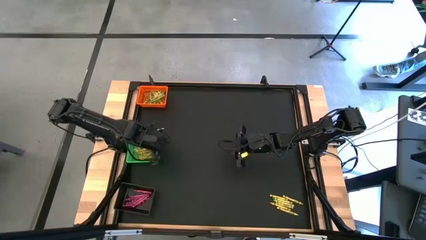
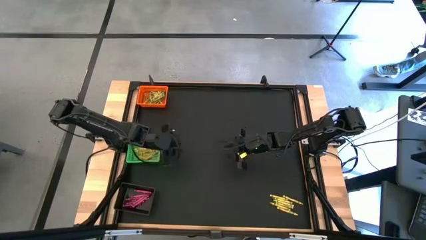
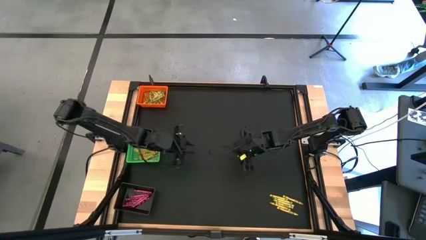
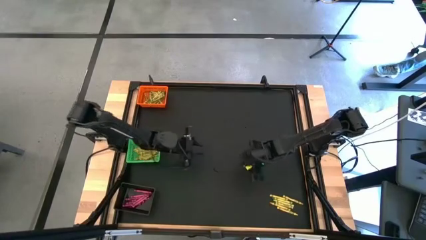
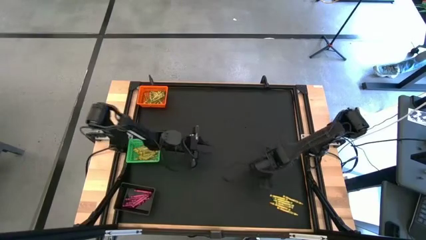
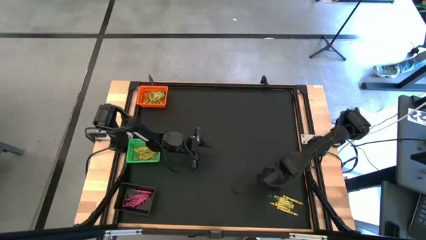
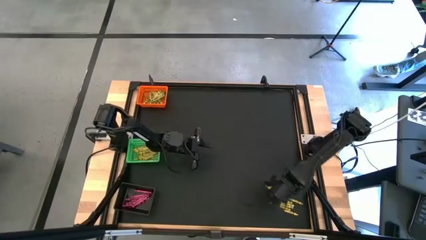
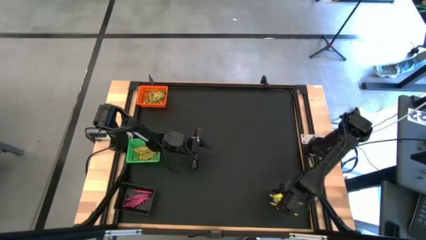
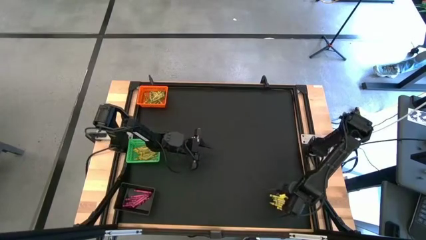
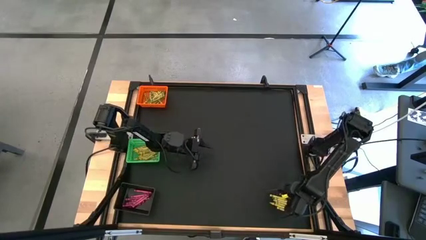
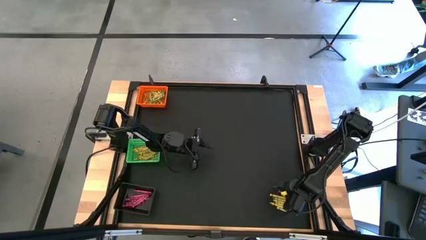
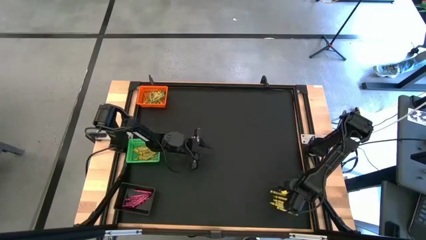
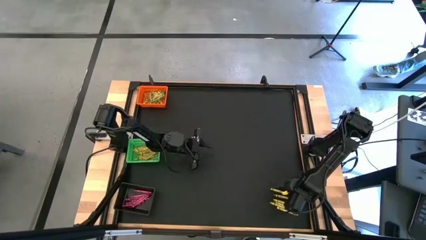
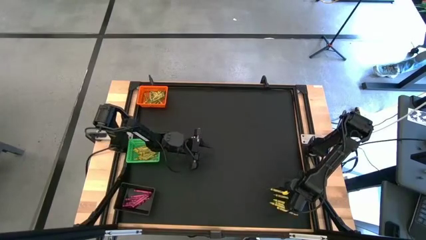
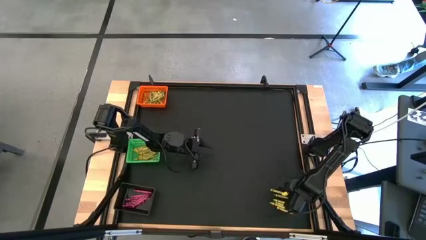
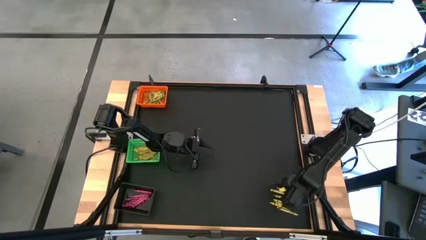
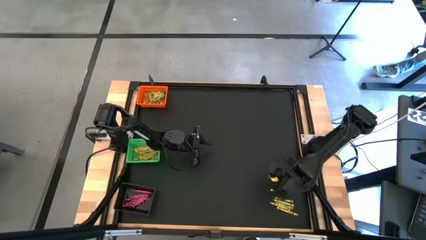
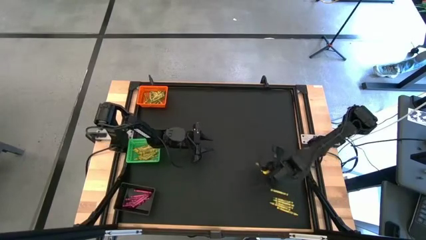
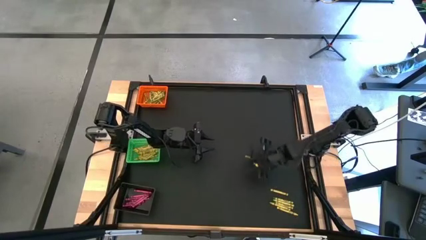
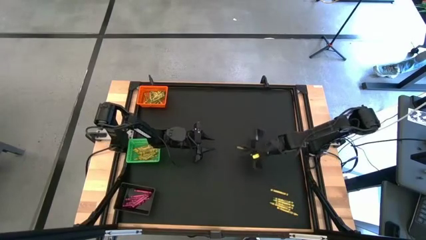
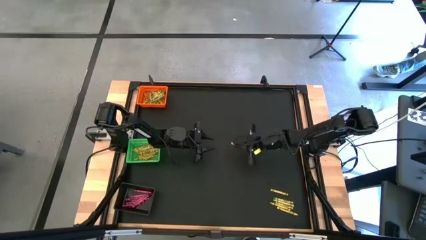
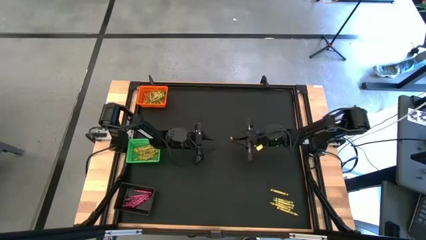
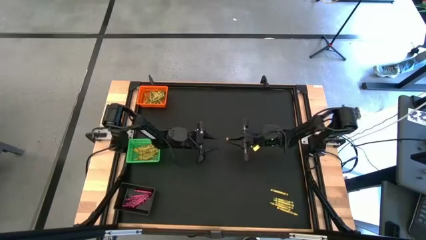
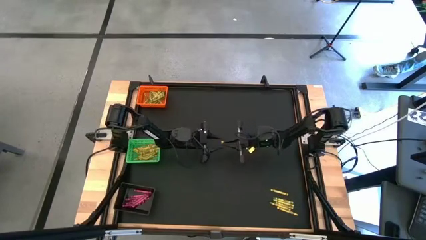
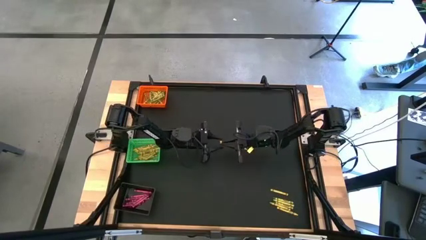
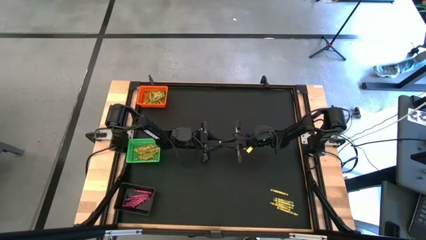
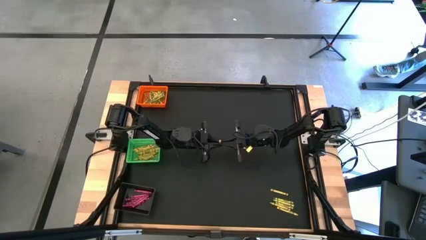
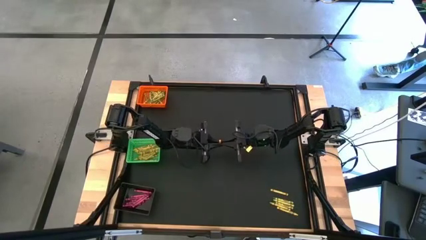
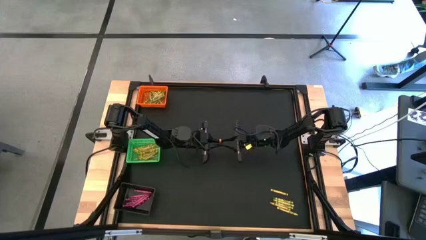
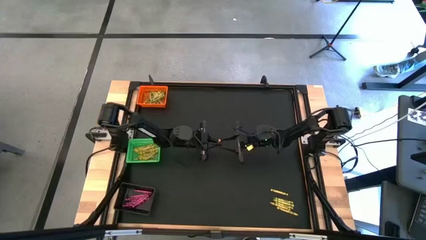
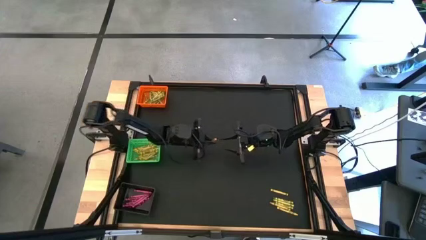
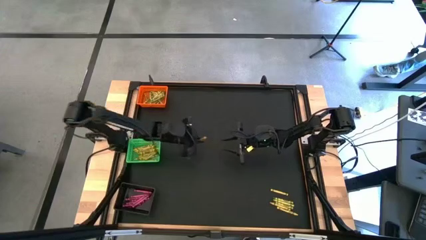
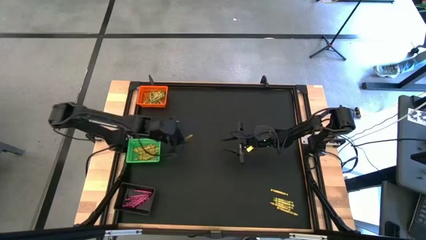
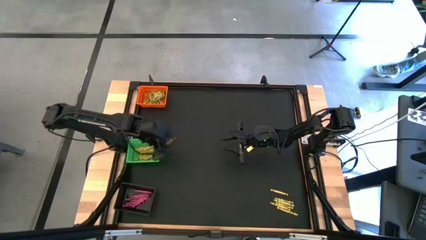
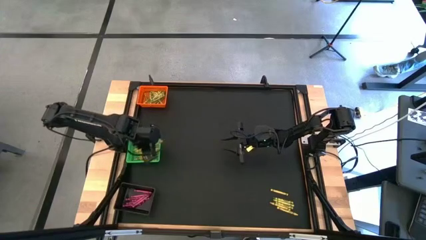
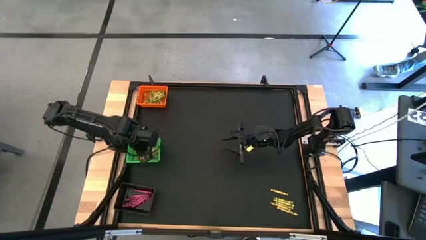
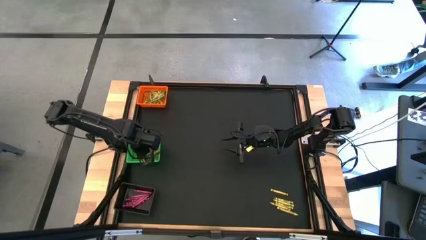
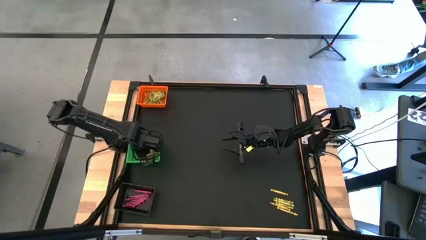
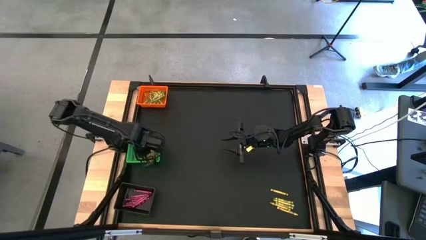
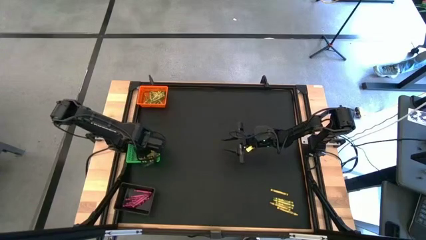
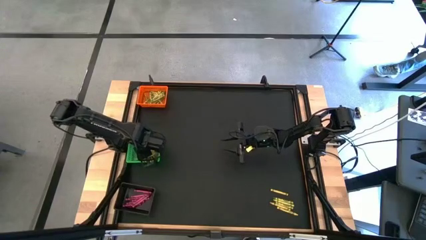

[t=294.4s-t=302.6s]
Task: Sort crayons
Put the yellow crayon into the green bin

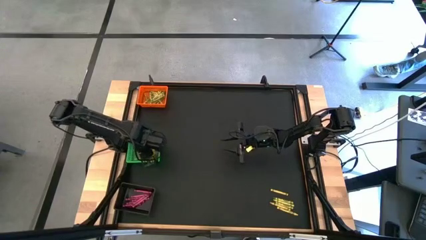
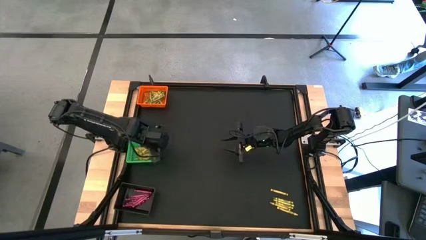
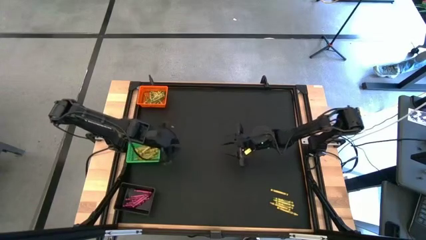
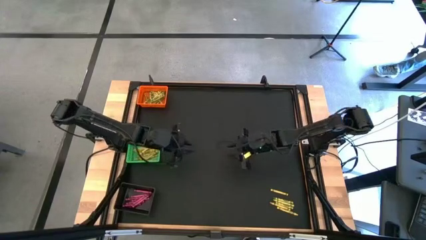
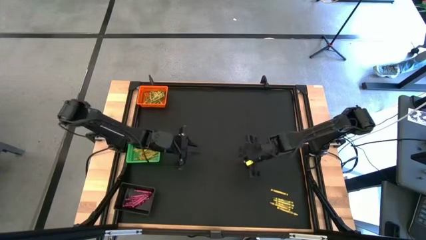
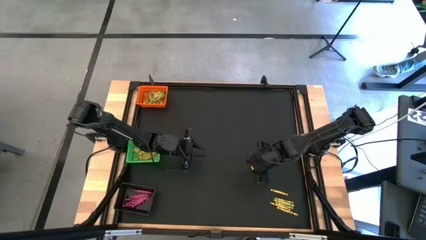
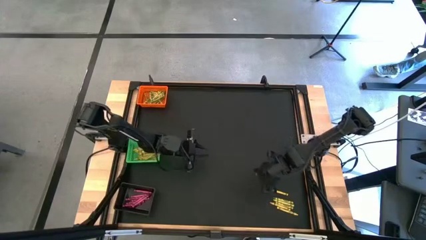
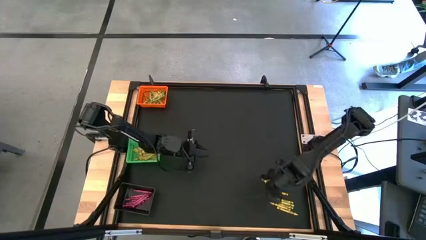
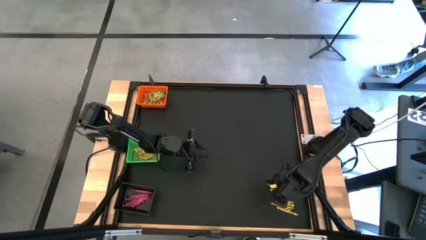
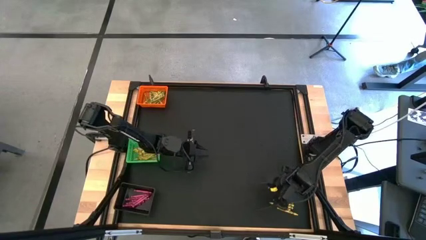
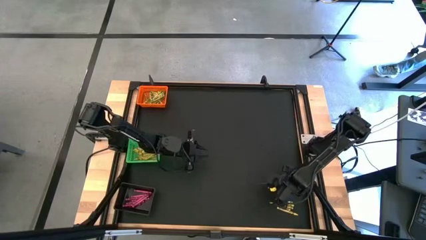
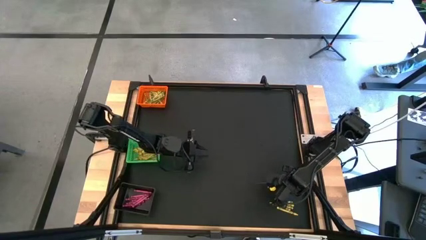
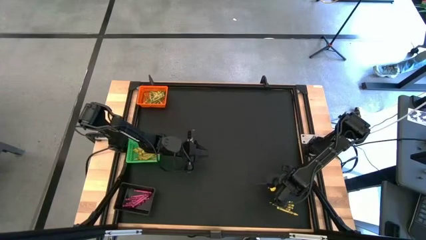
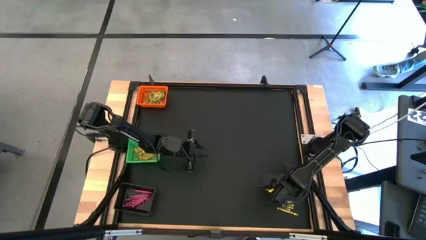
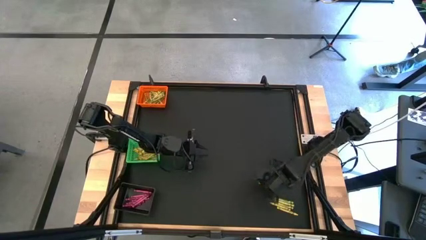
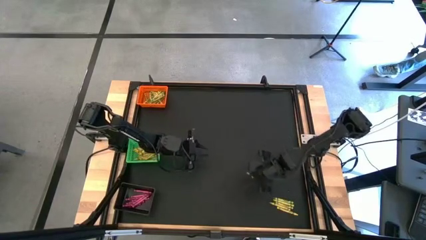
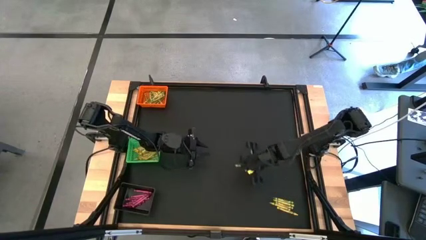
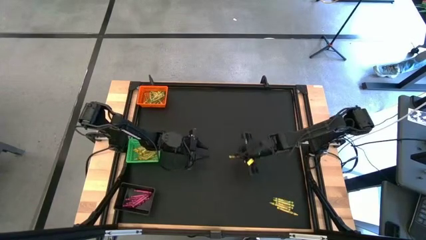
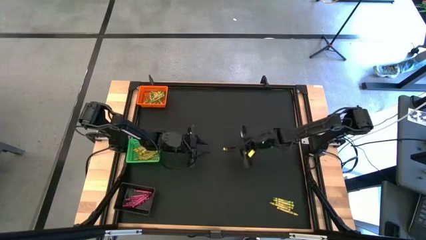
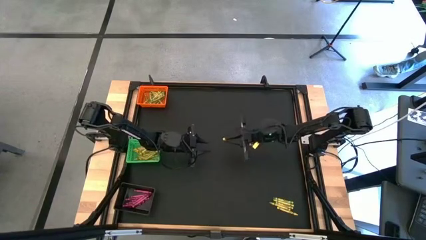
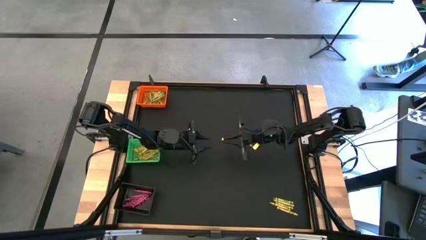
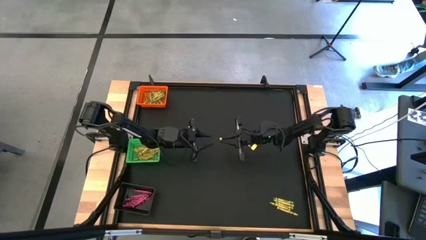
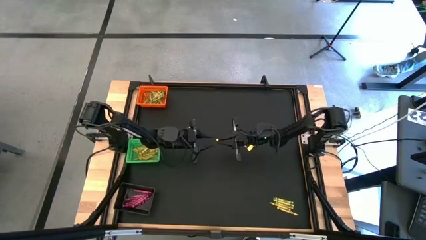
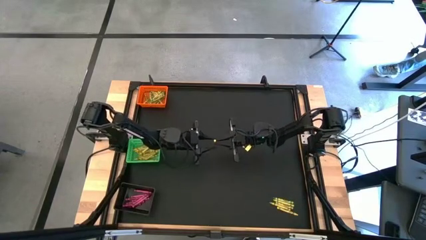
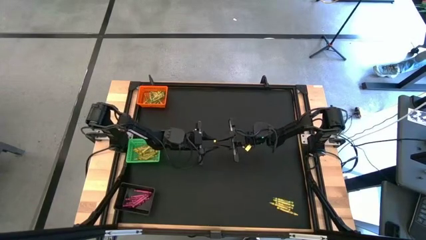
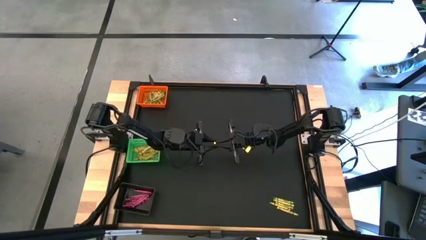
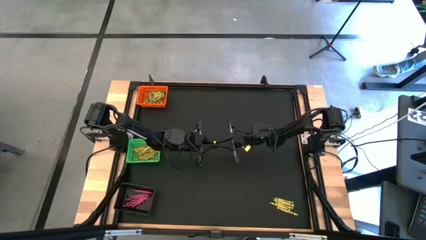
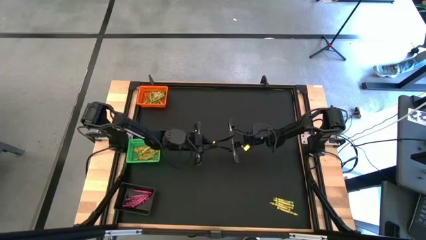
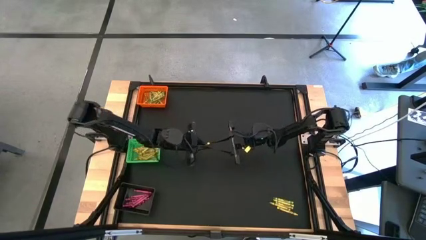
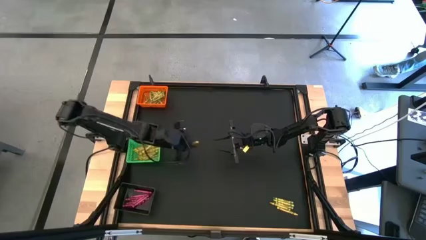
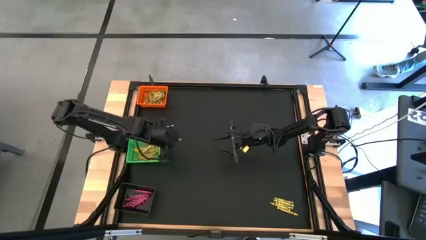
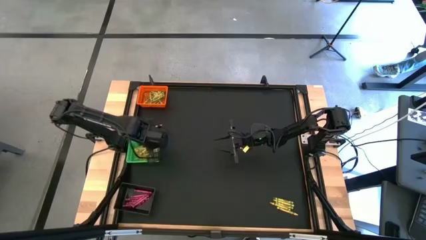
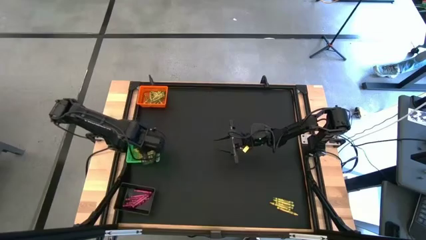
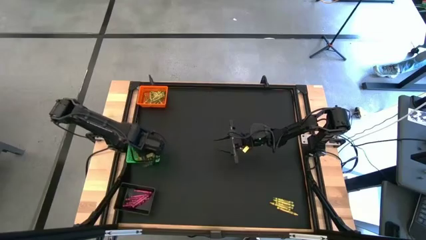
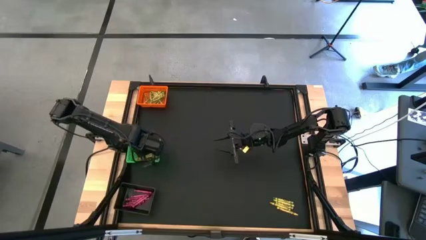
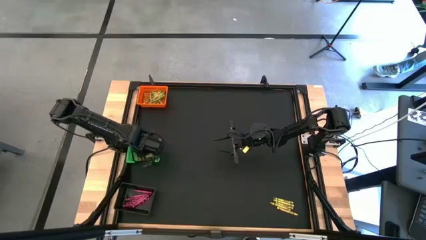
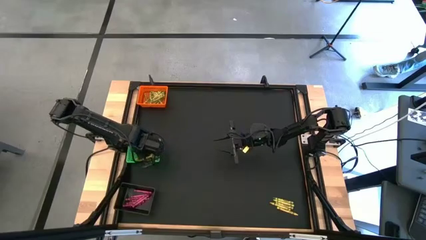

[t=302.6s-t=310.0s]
Put the yellow crayon into the green bin

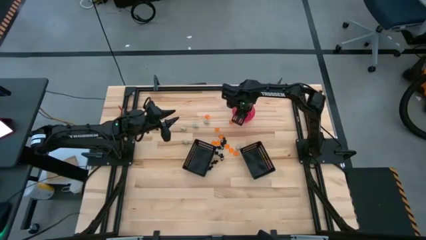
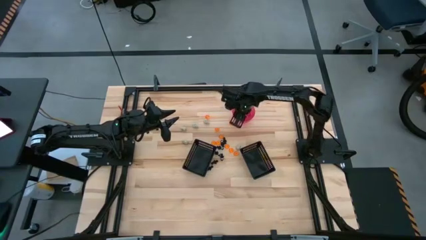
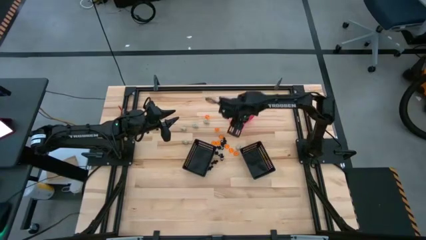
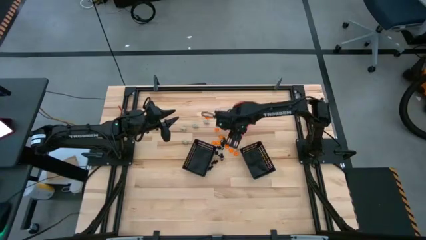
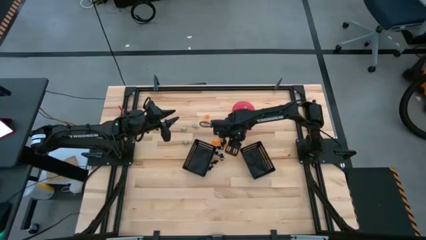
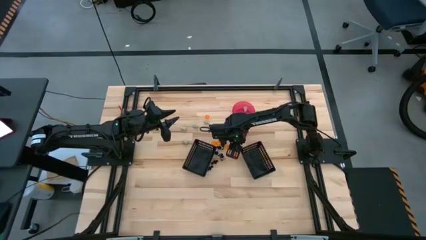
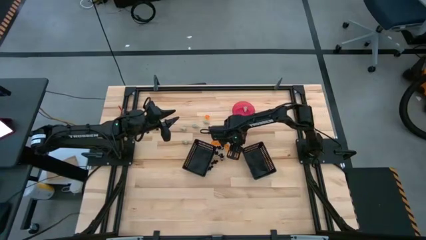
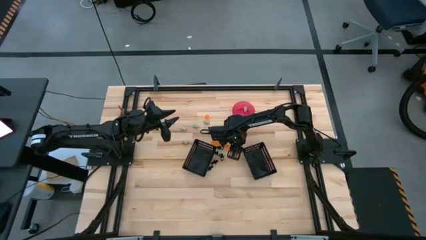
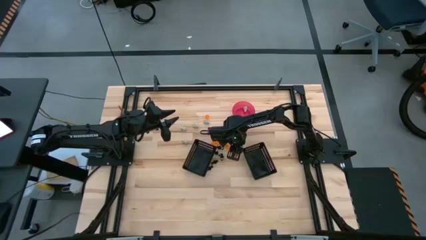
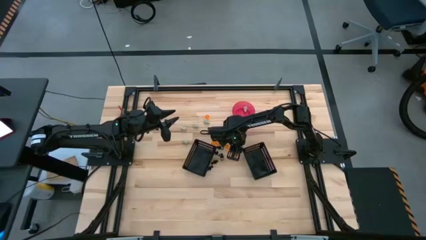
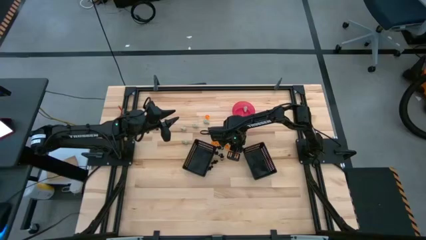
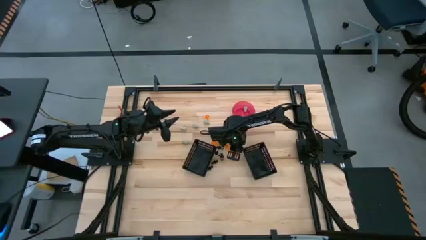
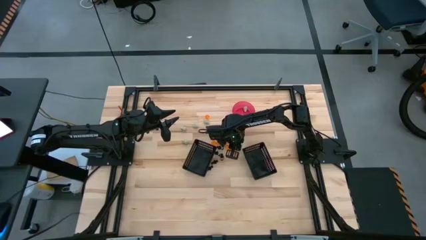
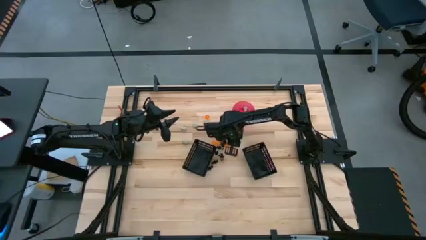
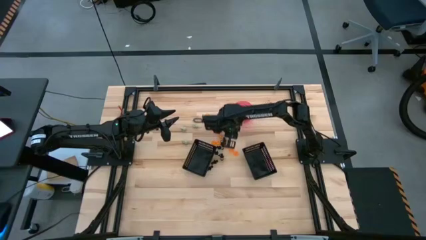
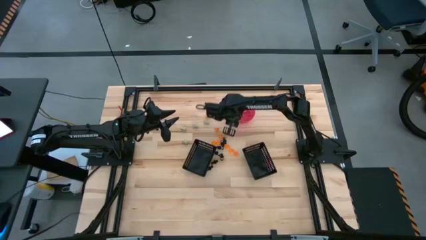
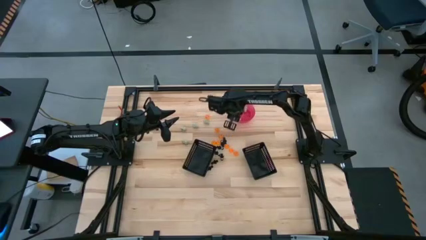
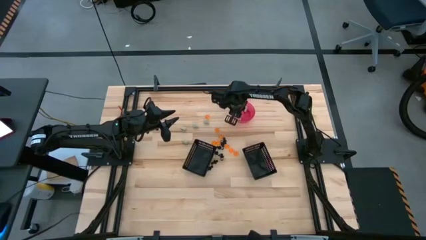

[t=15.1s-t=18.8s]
Task: Sort Halloween decoration
Put the white skull toy into the pink container
